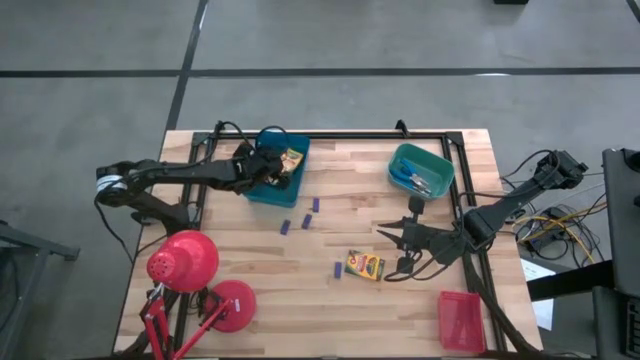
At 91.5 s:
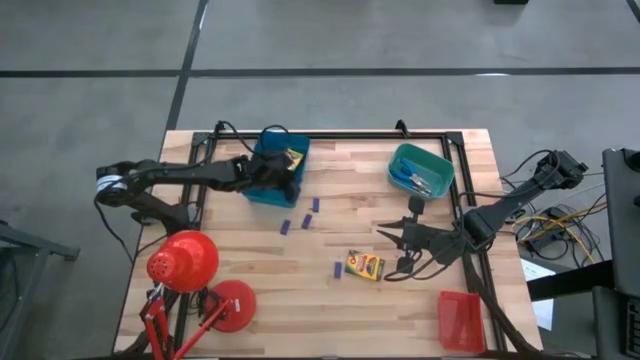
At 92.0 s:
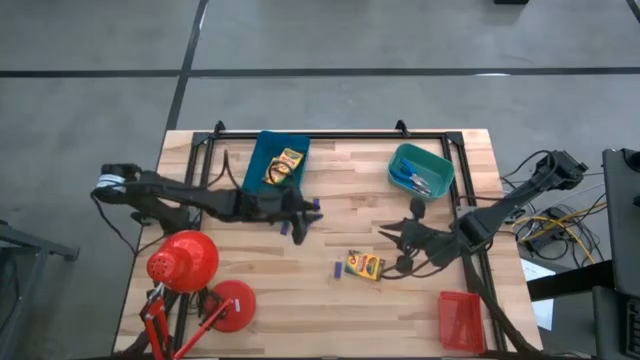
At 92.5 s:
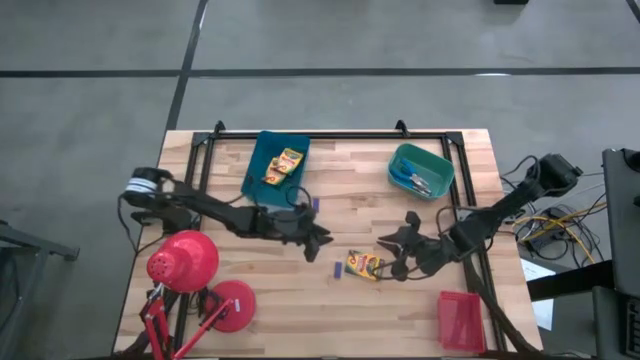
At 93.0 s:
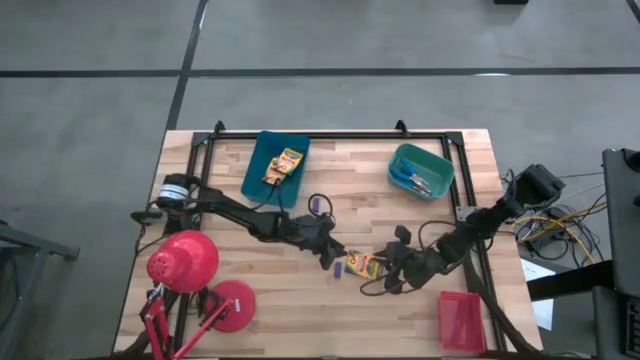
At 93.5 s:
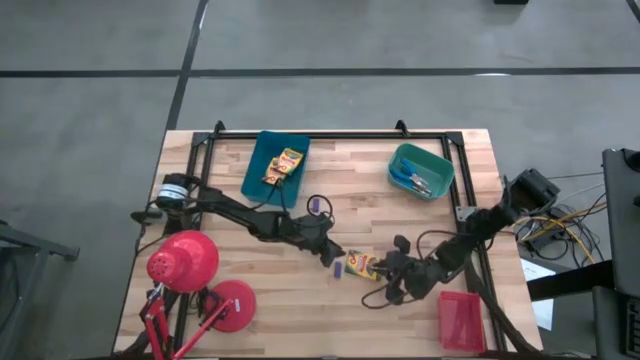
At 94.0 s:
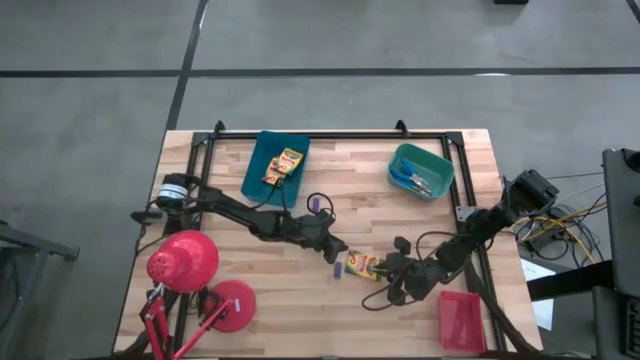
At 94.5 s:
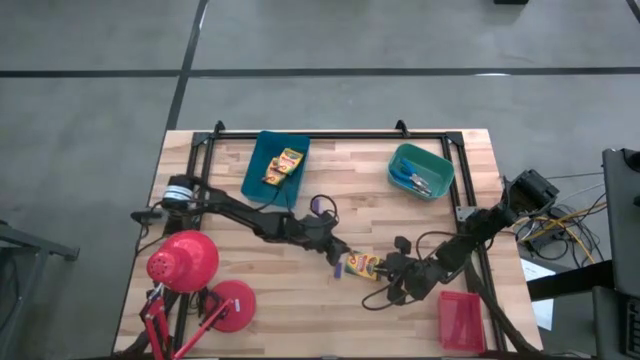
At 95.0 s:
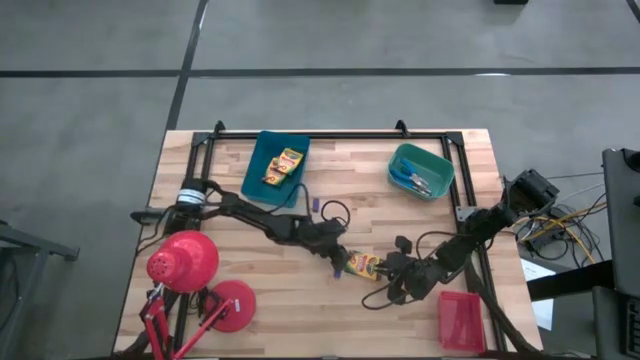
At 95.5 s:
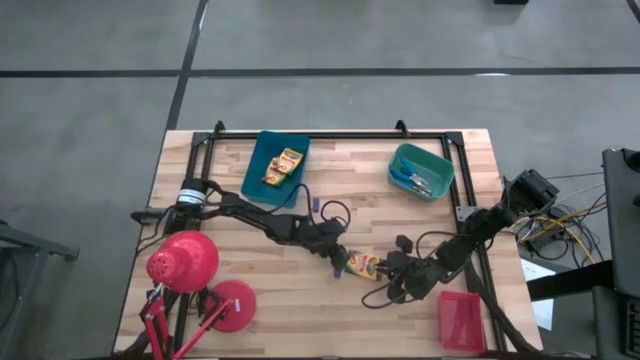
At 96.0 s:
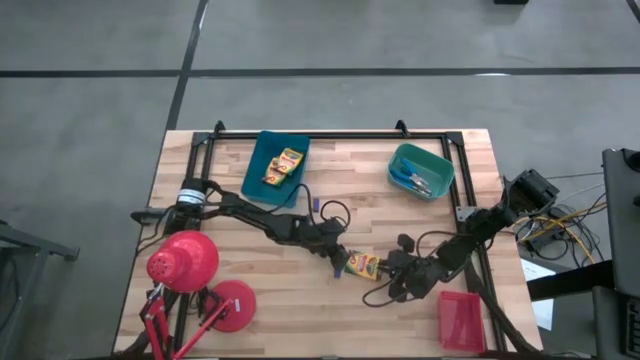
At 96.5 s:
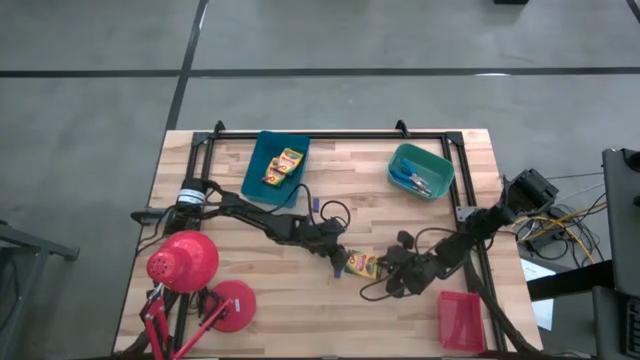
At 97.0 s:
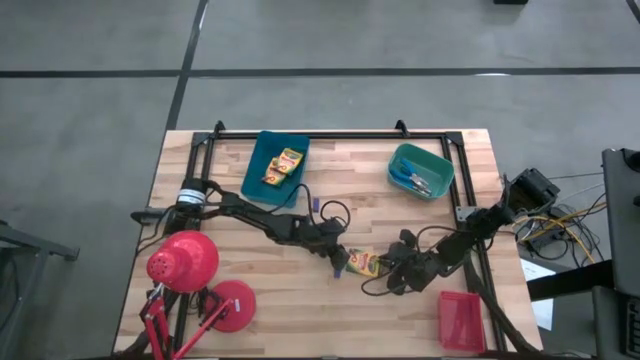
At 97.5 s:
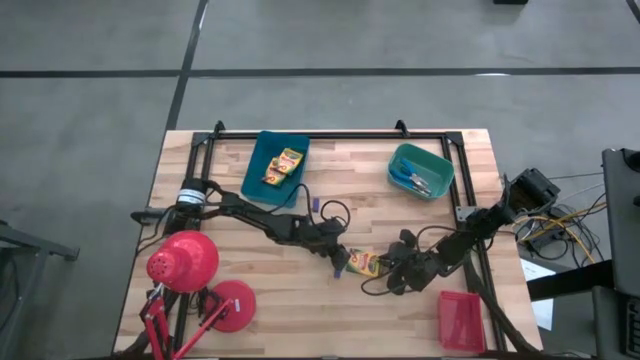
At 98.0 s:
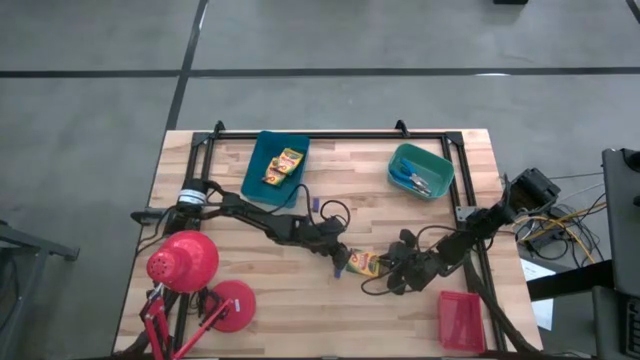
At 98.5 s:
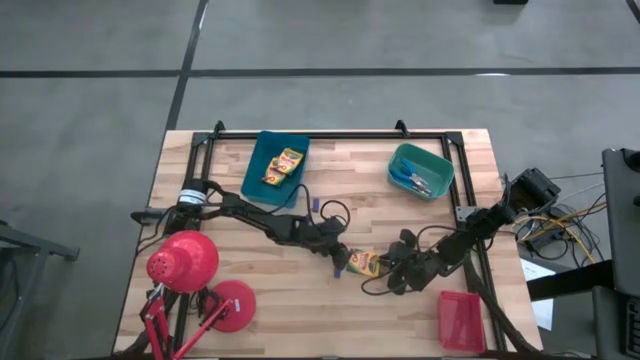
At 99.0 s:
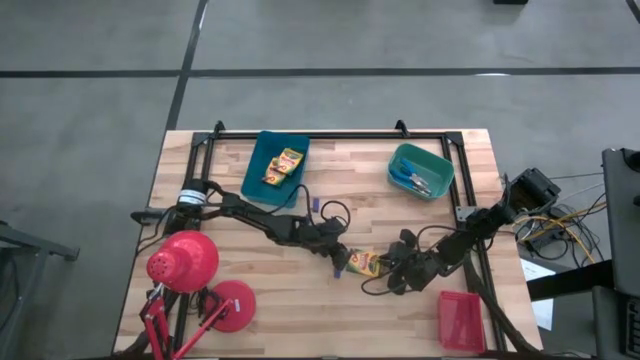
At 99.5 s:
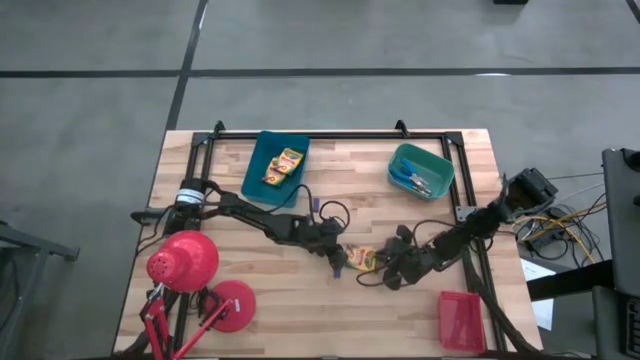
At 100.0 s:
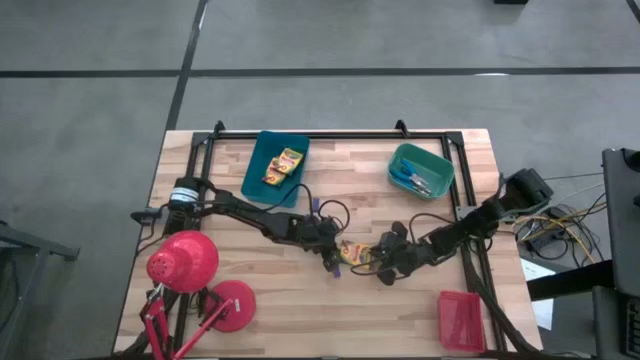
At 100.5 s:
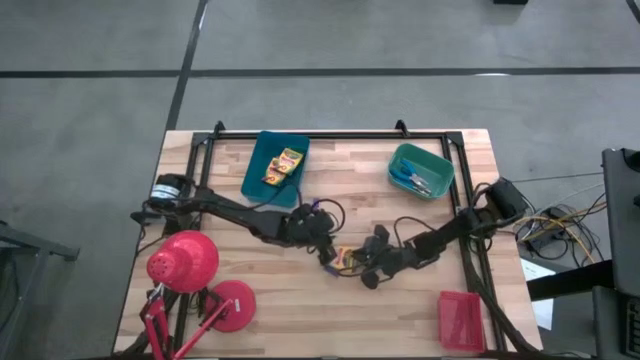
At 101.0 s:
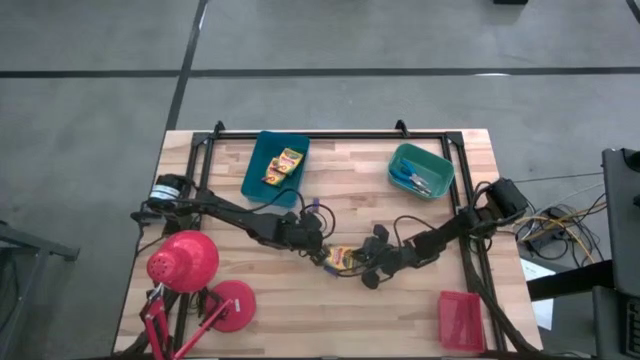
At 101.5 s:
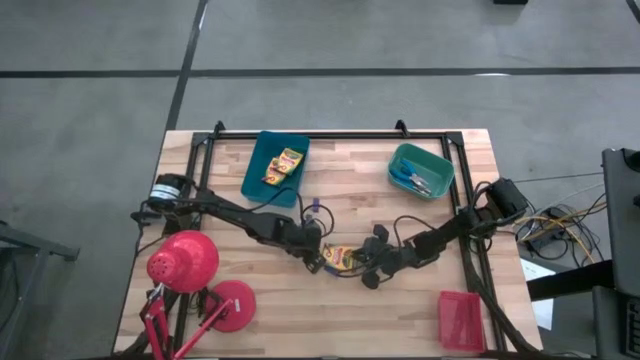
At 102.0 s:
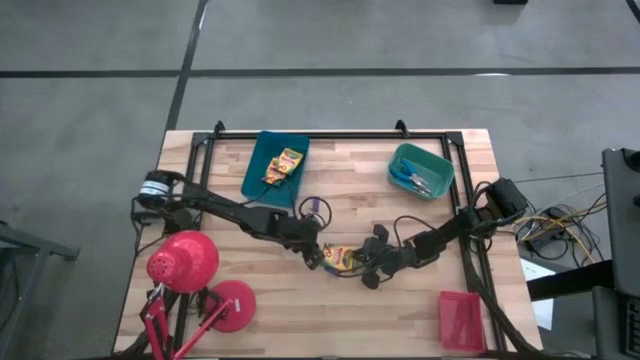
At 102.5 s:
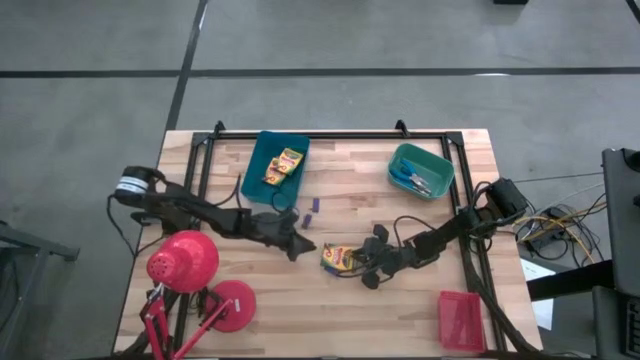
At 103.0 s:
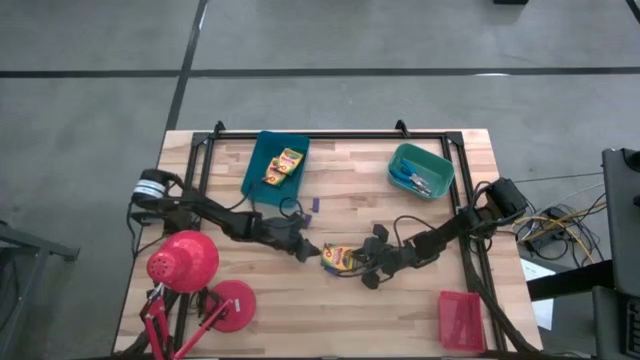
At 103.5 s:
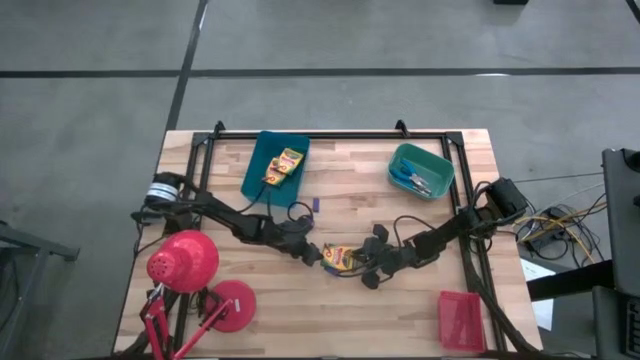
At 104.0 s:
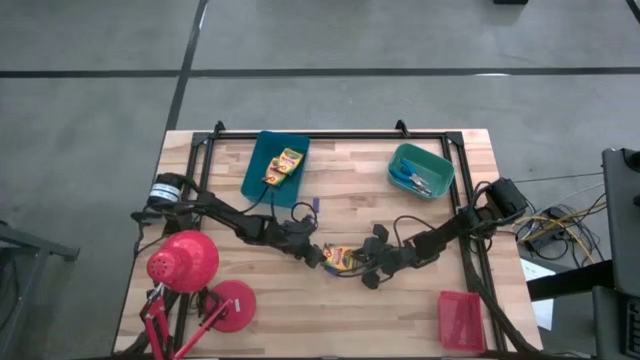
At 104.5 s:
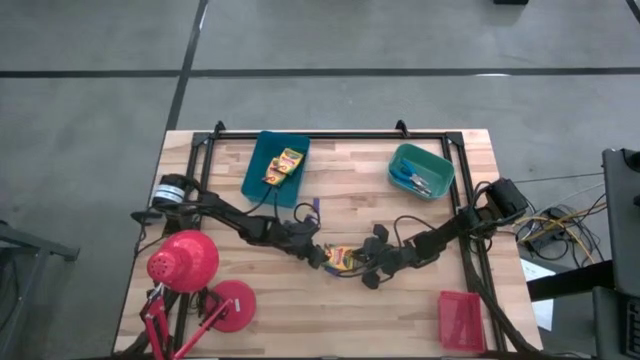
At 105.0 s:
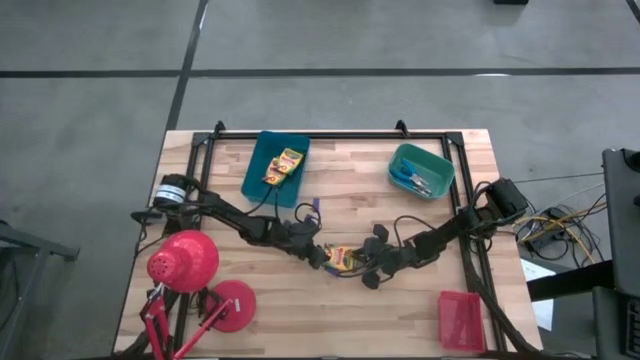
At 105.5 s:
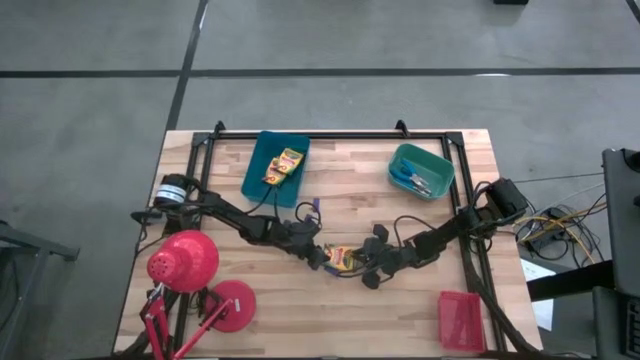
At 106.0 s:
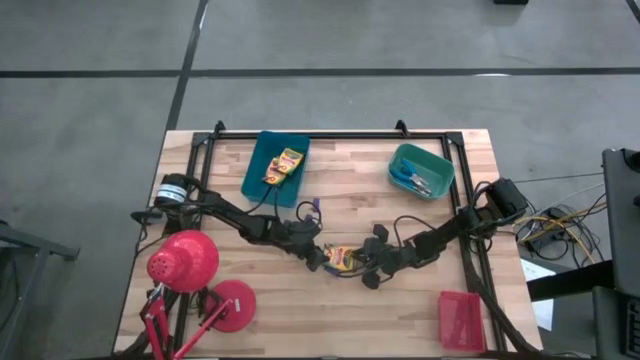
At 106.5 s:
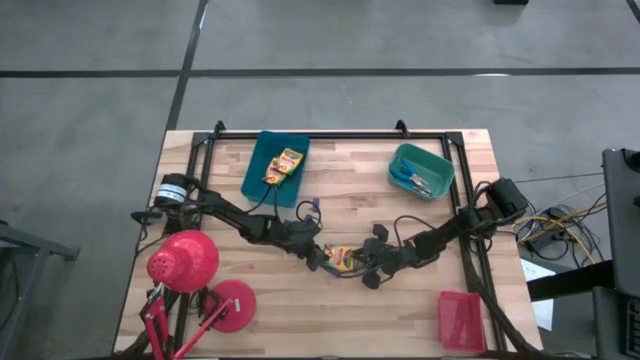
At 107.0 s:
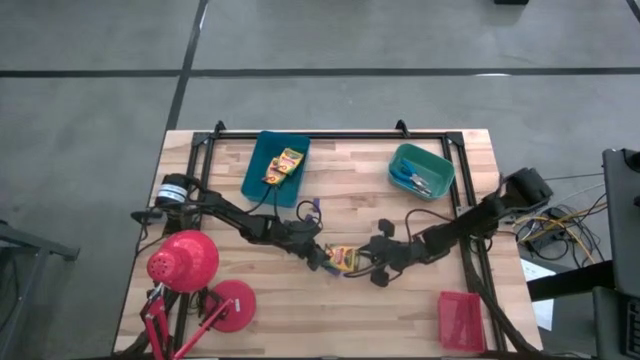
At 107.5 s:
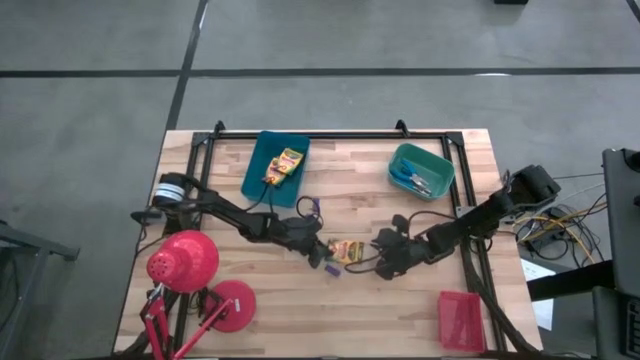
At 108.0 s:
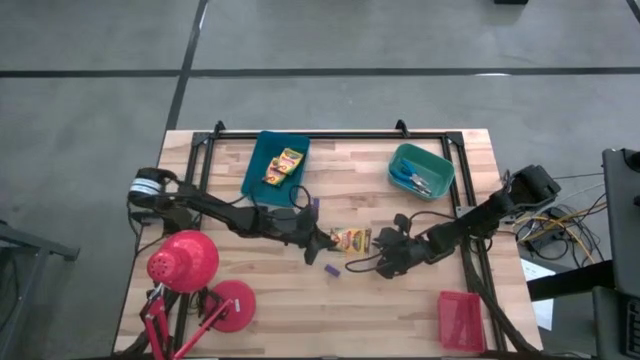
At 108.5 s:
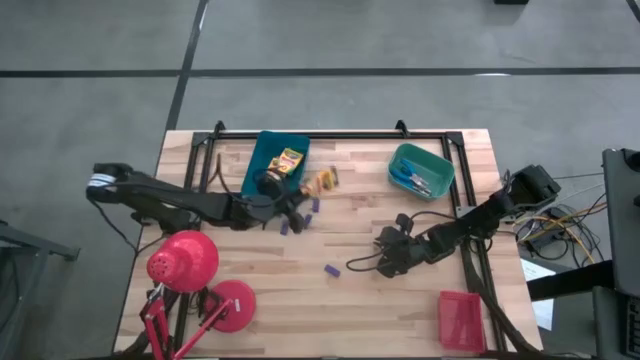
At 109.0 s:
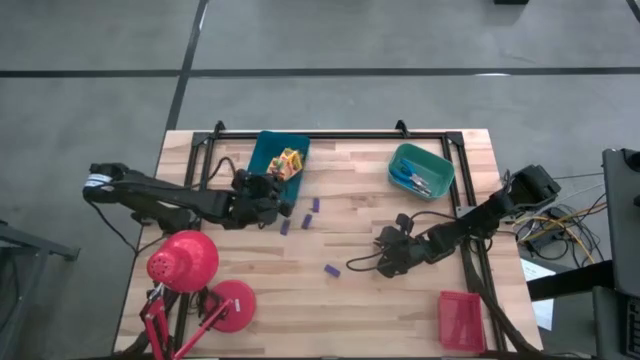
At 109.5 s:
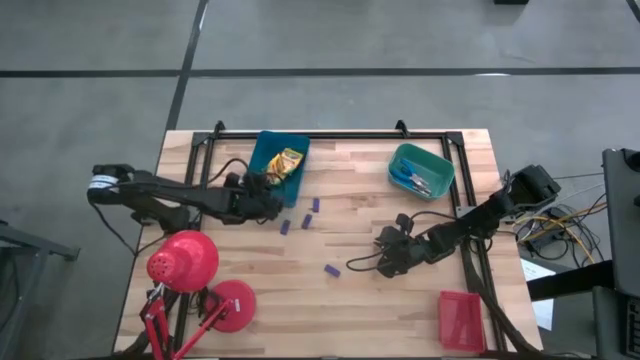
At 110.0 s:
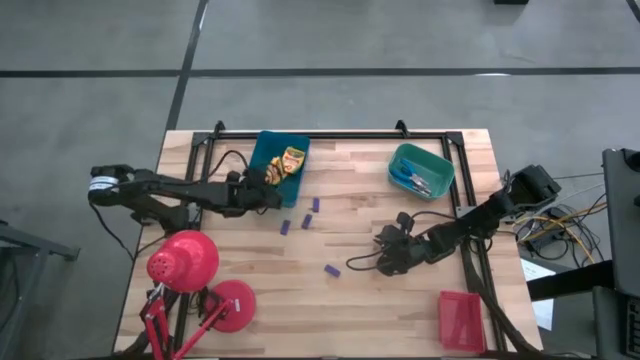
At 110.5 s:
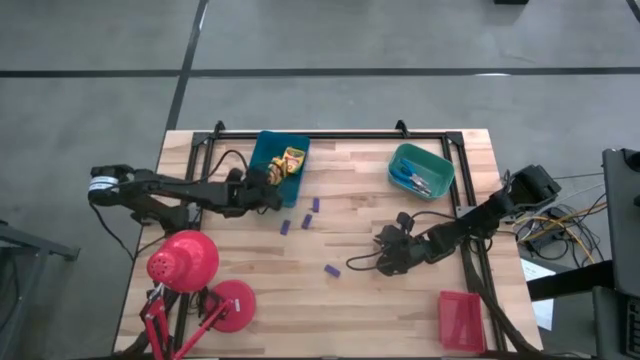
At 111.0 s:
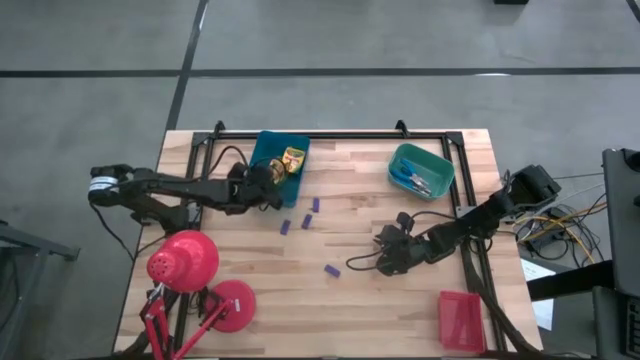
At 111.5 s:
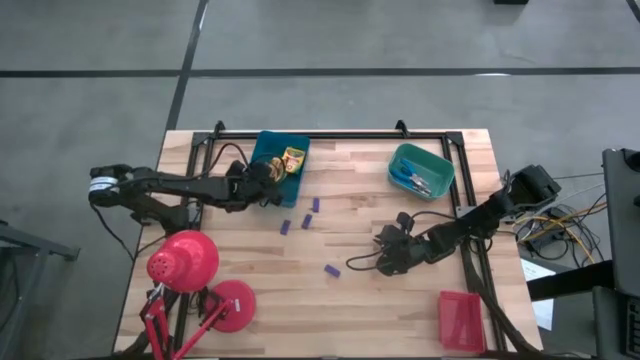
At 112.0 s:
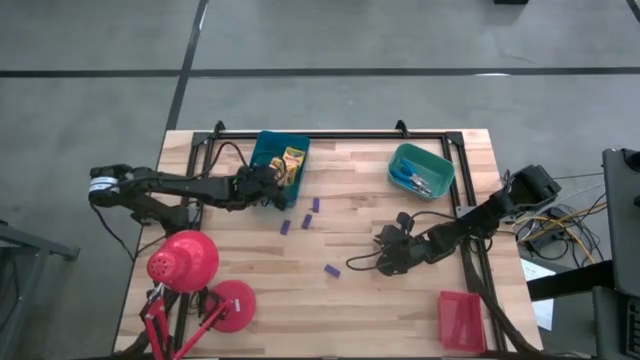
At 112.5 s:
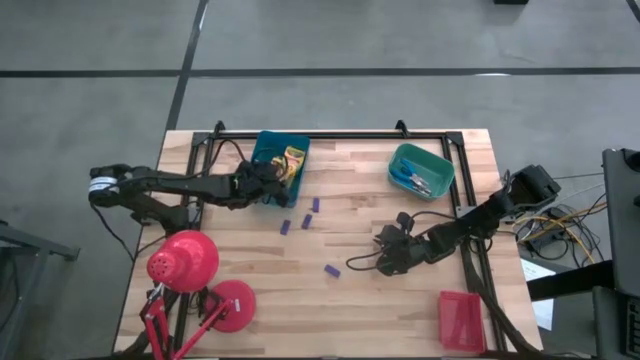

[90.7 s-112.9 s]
Task: Pick & Place School Supplies
Put the yellow crayon box into the blue bin
